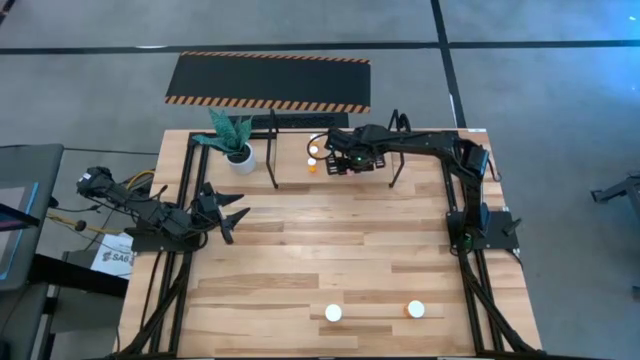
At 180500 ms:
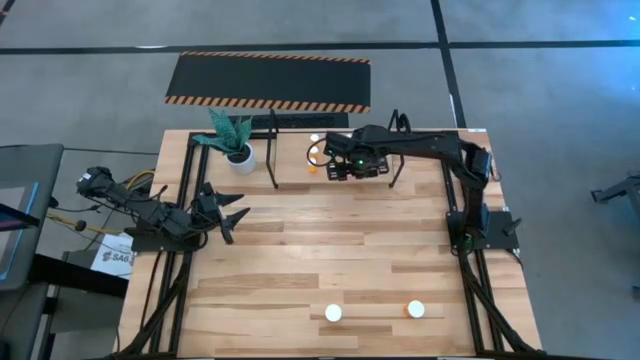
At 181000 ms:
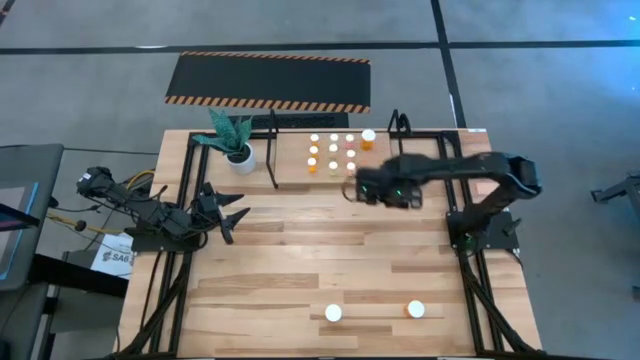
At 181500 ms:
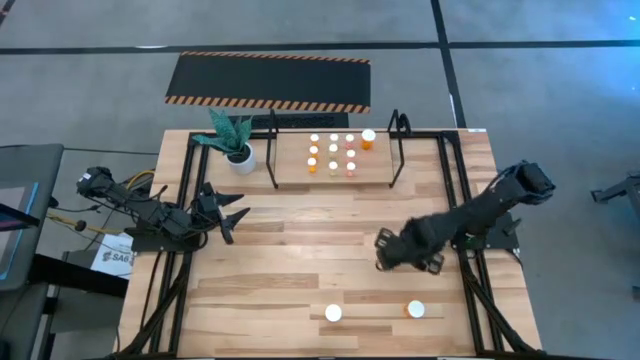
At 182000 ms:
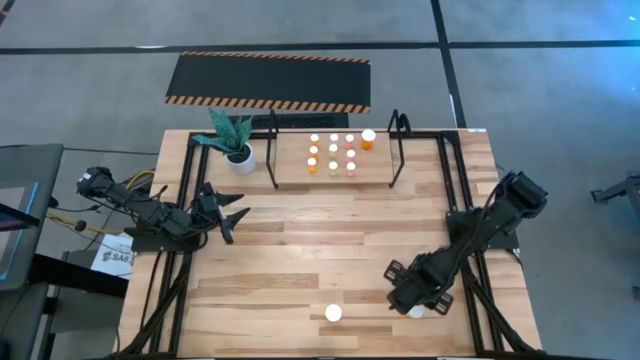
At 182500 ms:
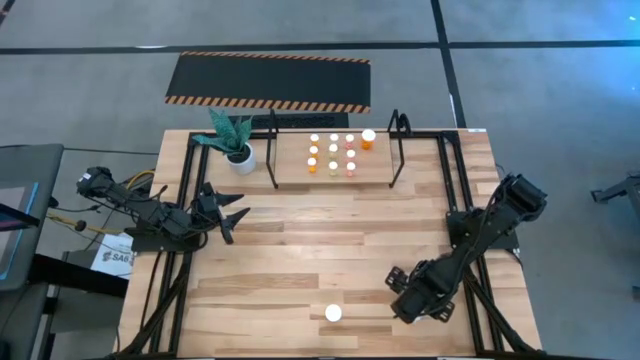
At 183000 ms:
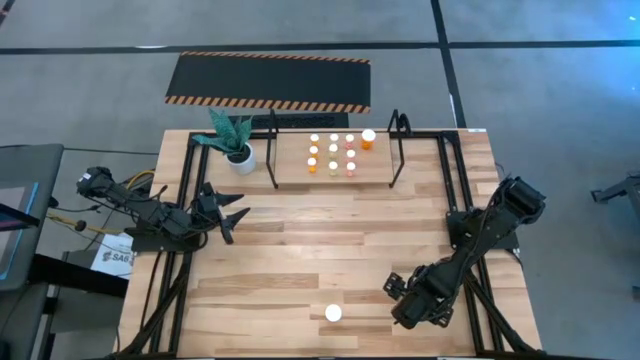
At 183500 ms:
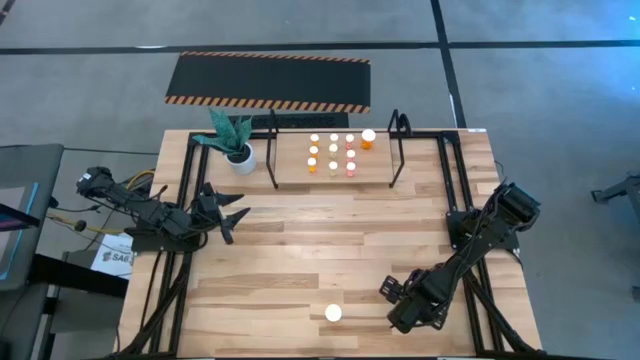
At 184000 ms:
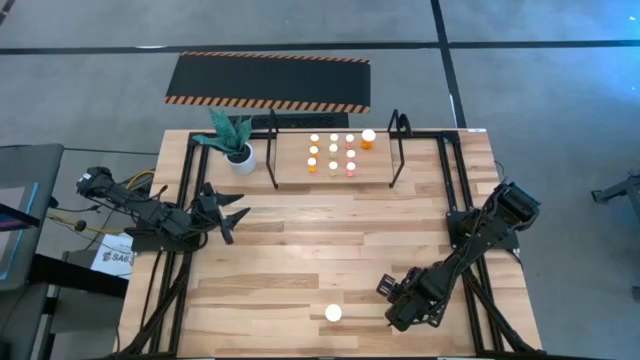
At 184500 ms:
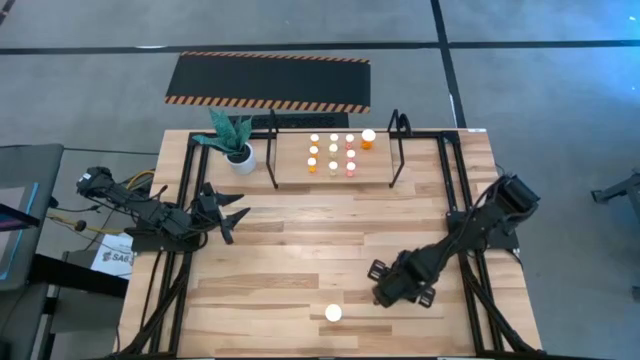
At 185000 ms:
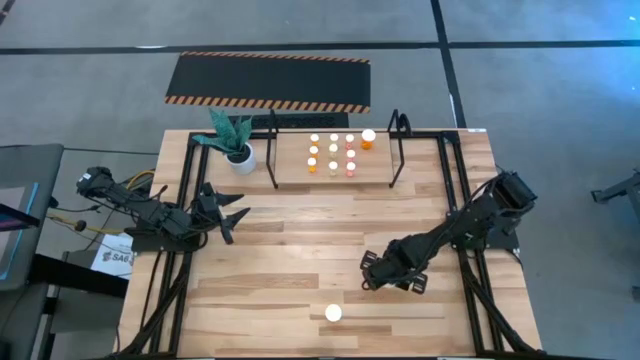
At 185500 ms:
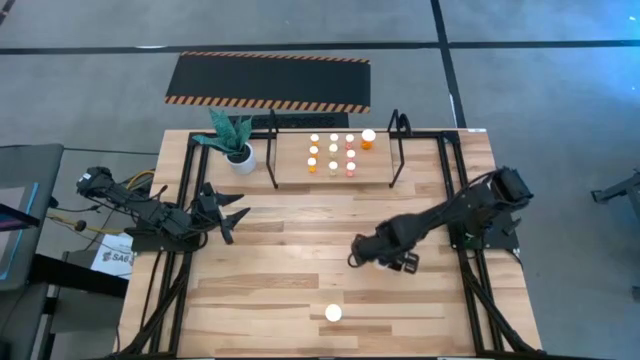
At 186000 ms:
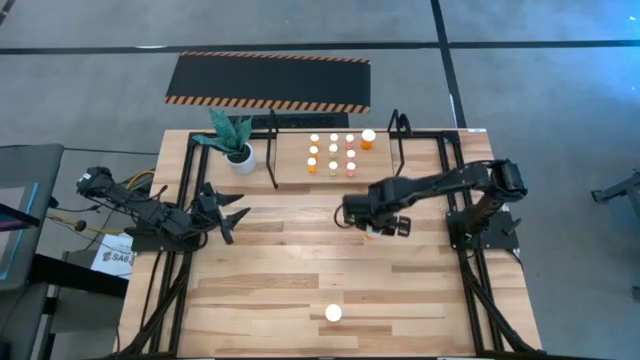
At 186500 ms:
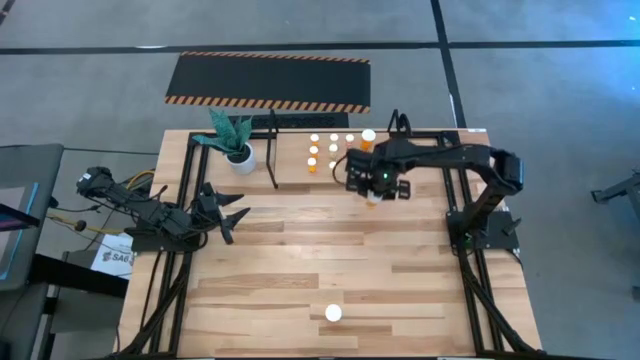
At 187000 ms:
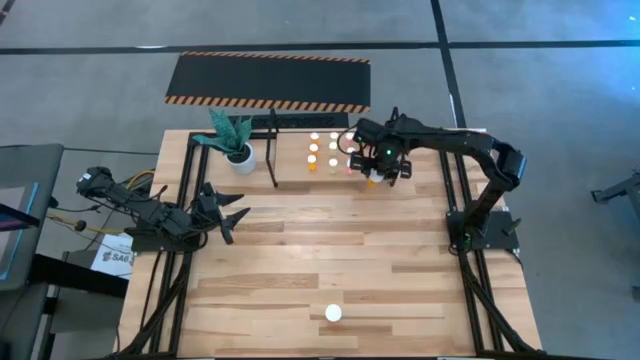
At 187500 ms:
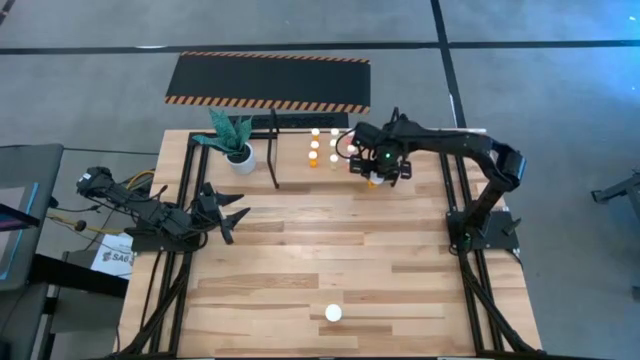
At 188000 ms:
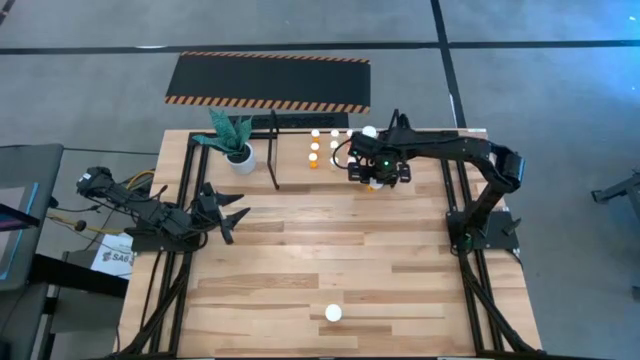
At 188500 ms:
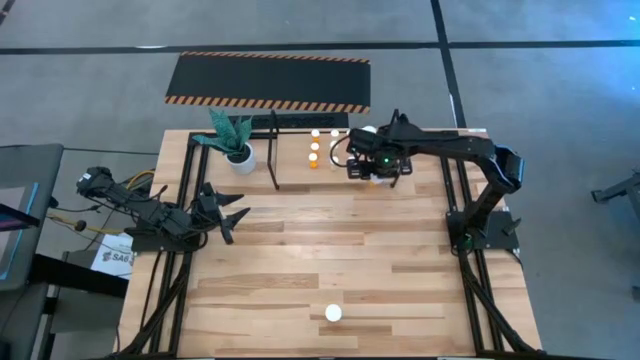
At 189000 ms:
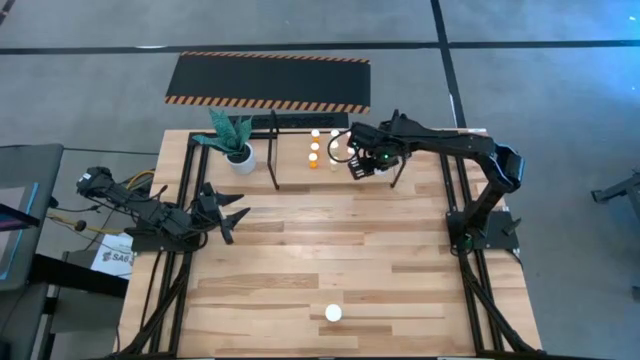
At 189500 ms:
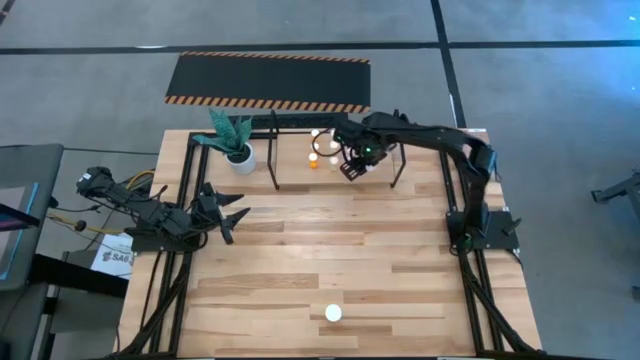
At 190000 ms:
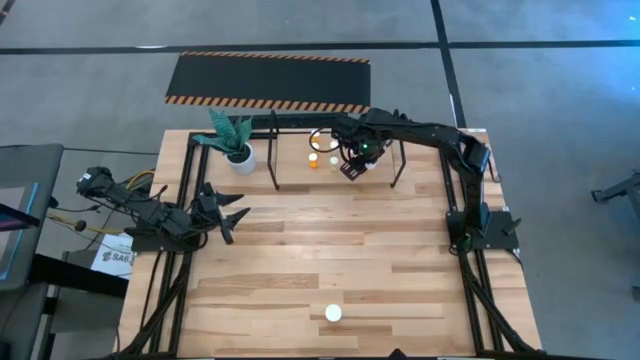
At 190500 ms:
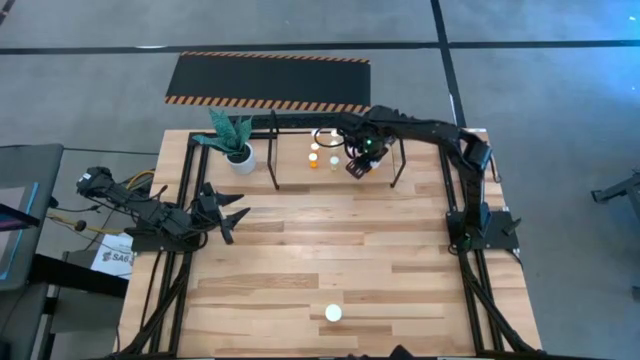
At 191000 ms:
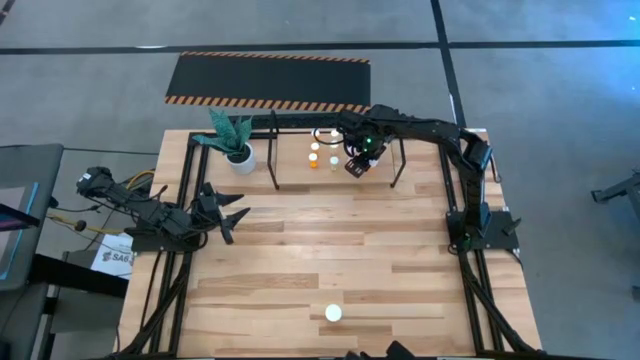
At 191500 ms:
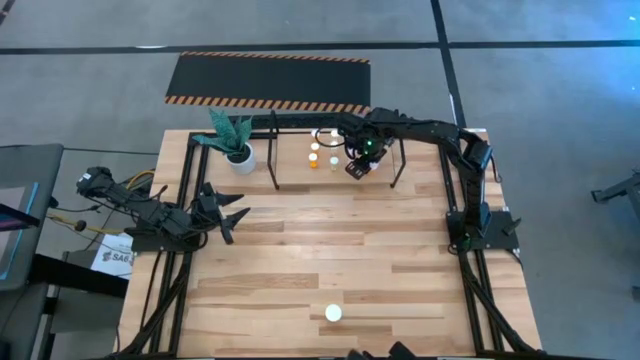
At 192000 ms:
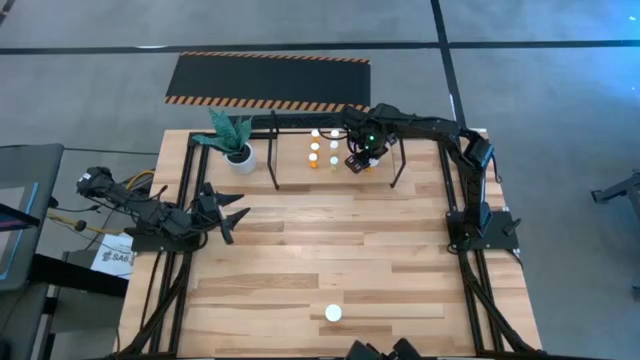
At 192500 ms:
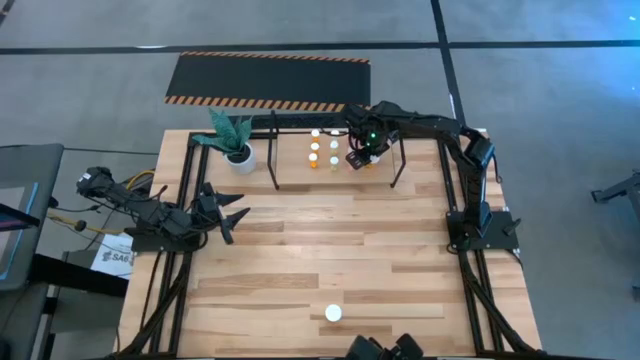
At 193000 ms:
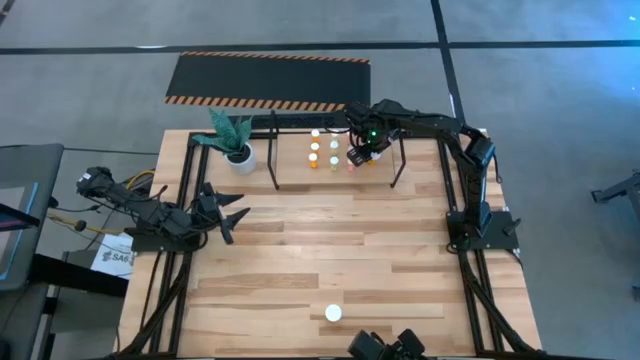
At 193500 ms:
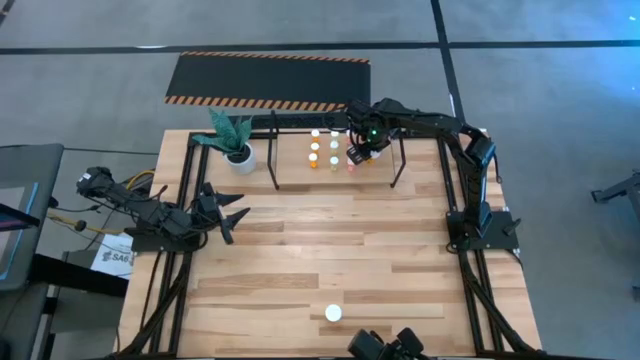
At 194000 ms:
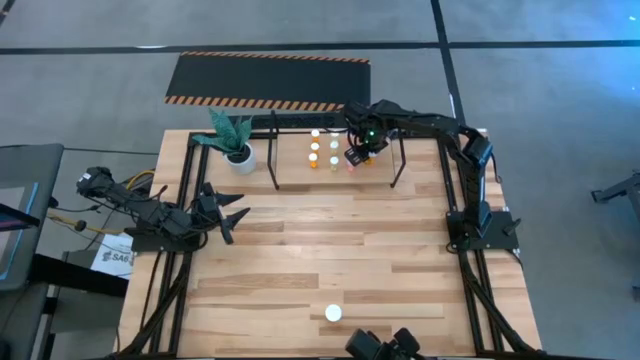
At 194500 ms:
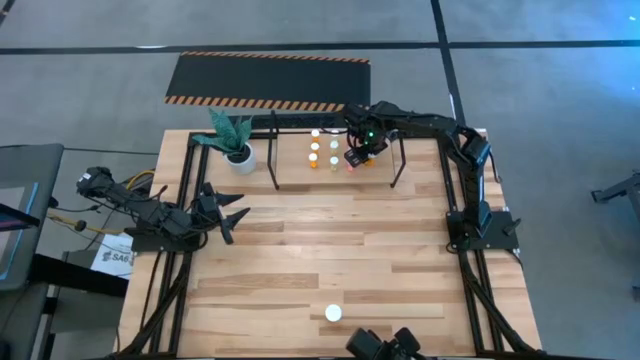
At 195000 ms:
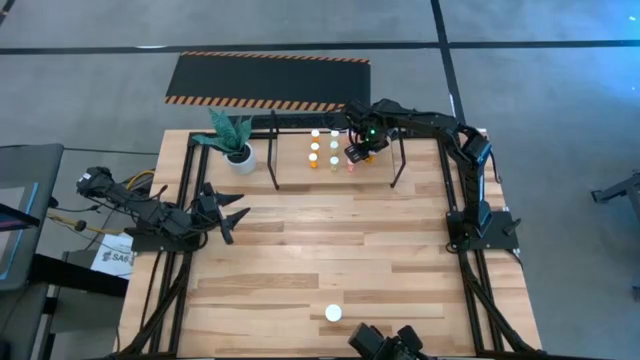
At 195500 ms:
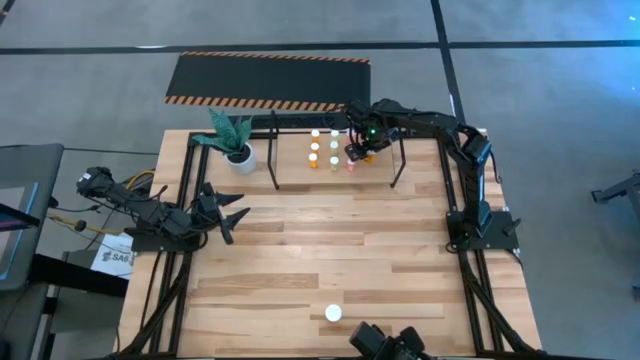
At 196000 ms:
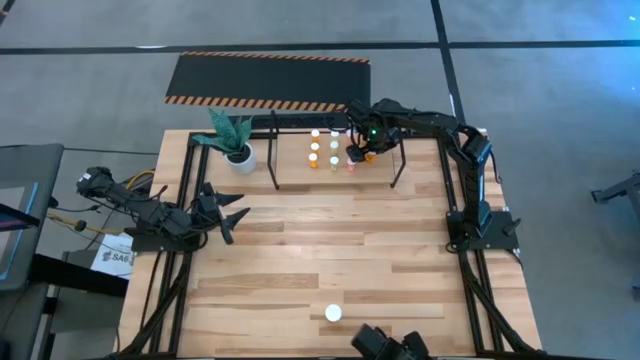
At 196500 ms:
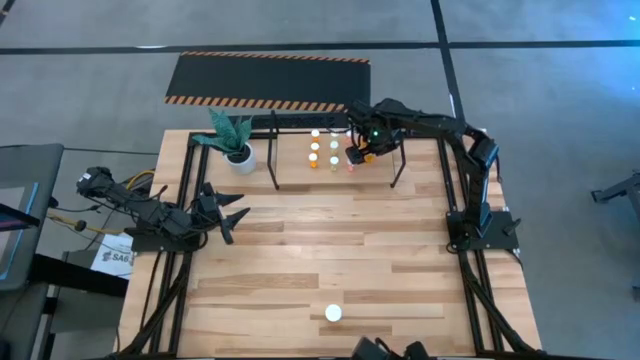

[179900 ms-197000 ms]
Task: Pick and place medicine bottles onto shelf by color
Put the right big orange pill bottle aligned with the other big orange pill bottle on the shelf

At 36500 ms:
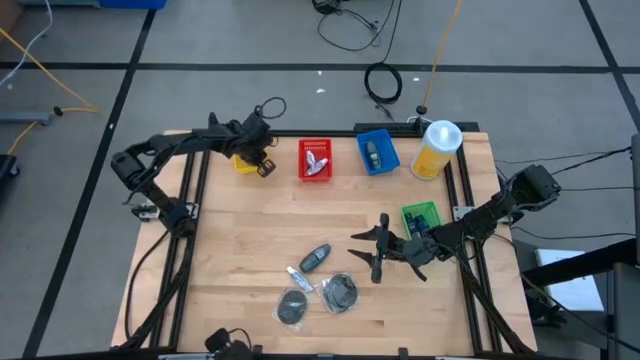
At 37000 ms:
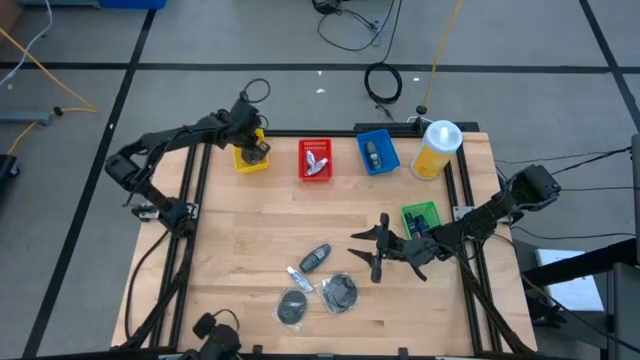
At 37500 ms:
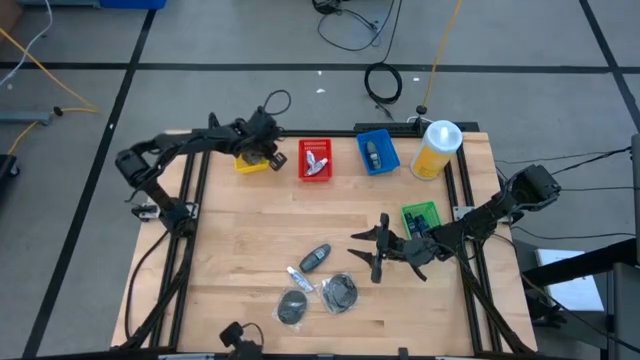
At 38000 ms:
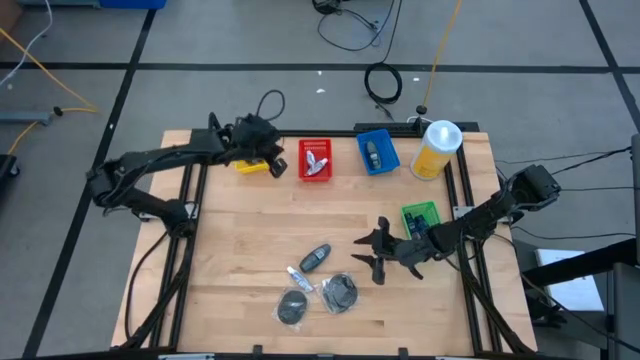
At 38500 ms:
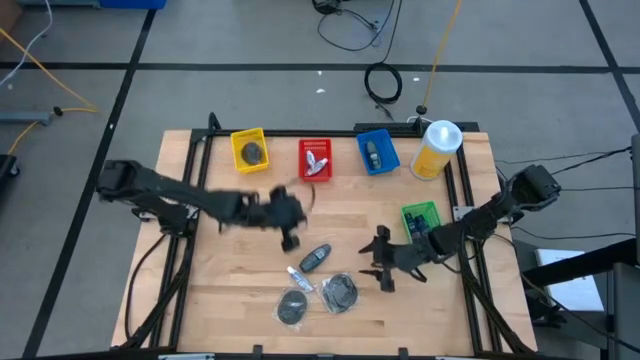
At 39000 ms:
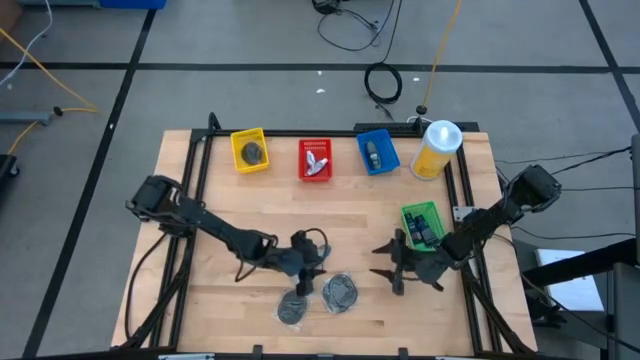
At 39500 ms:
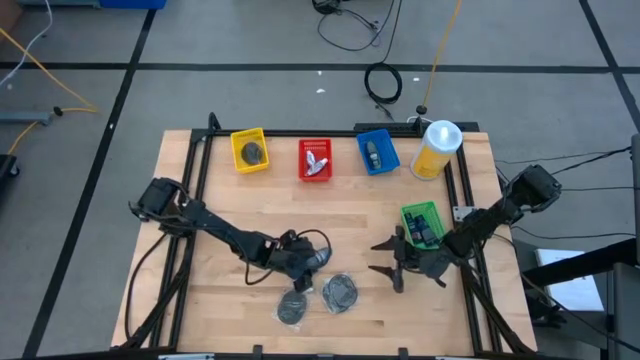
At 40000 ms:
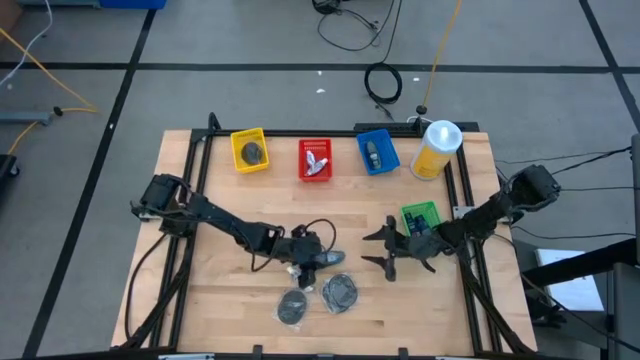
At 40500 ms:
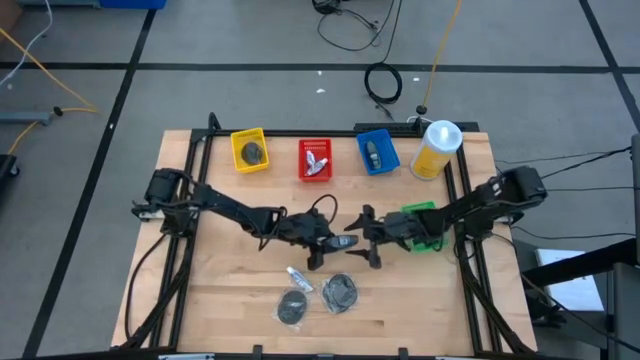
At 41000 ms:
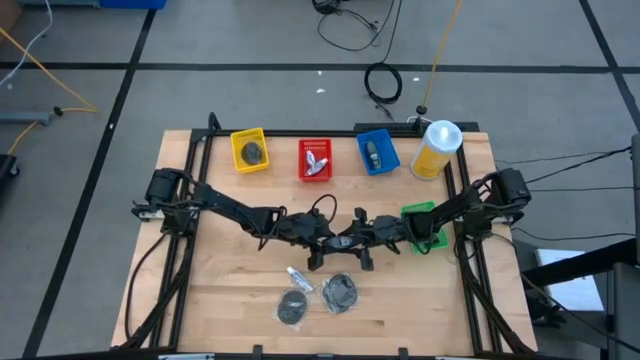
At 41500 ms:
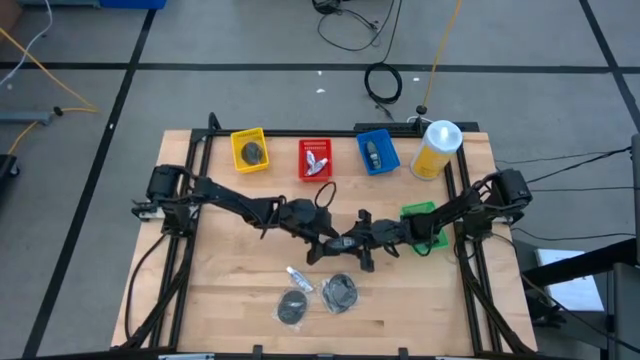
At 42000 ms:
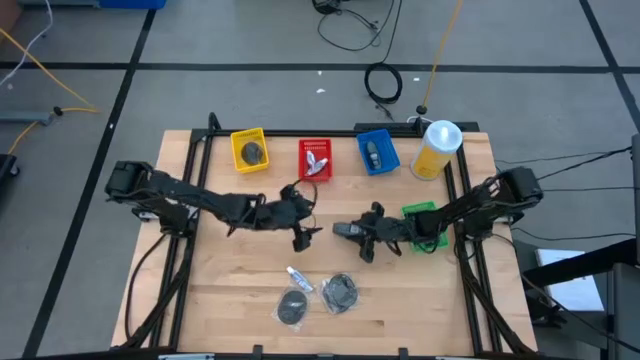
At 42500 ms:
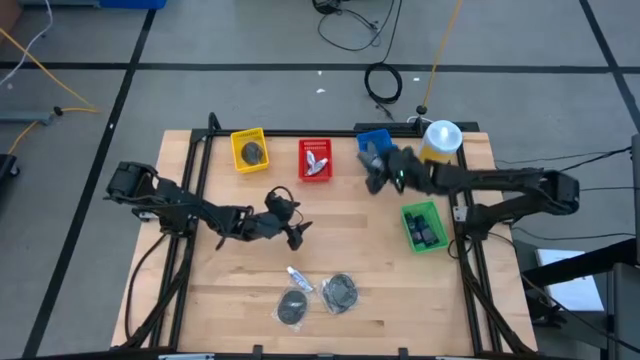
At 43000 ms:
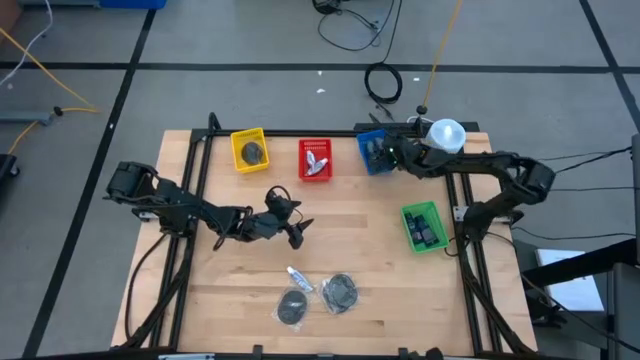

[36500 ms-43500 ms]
Task: Pick & Place Travel size toiletries
Put the gray deodorant into the blue bin
